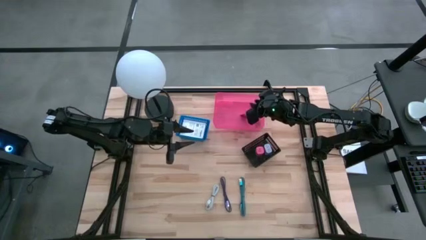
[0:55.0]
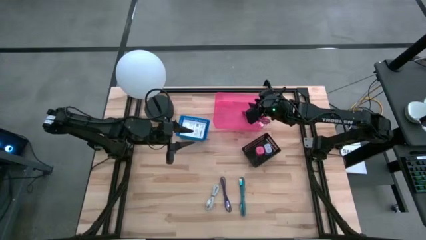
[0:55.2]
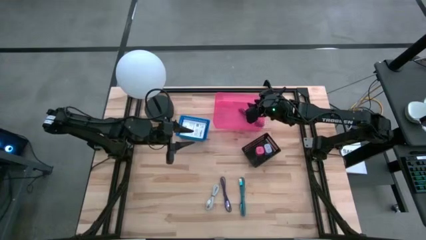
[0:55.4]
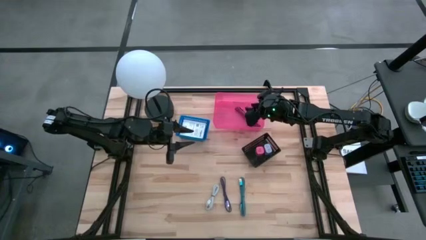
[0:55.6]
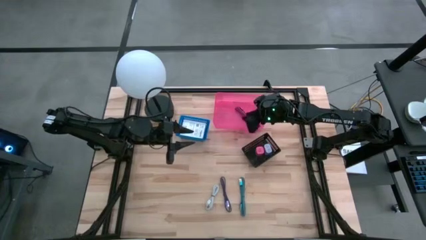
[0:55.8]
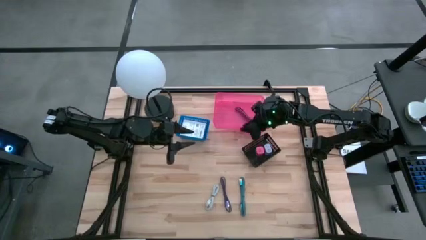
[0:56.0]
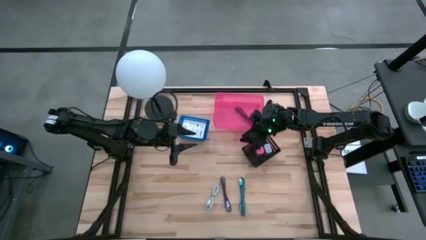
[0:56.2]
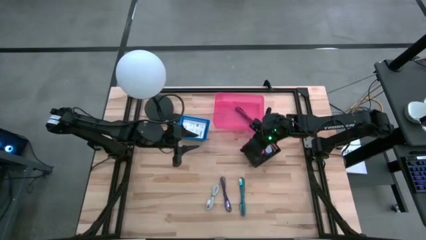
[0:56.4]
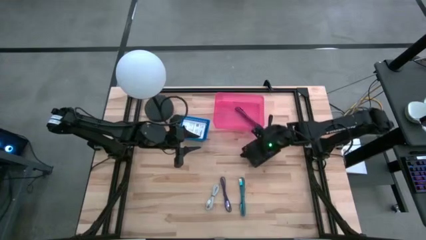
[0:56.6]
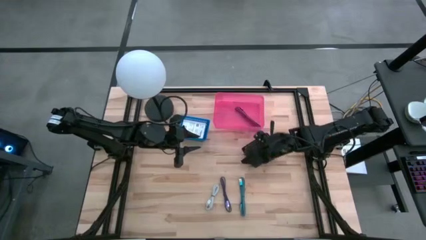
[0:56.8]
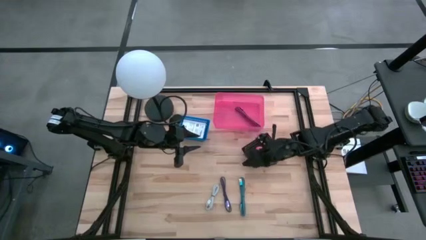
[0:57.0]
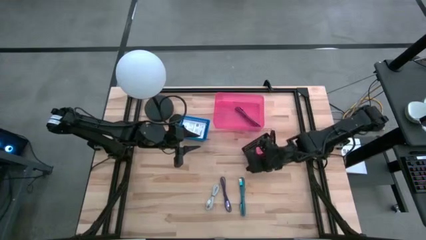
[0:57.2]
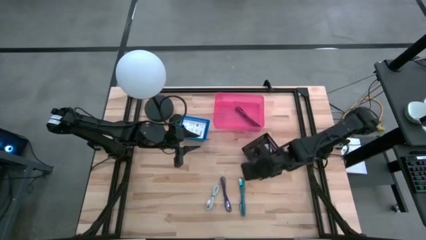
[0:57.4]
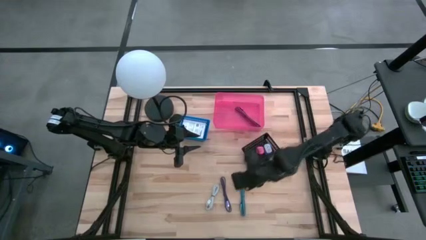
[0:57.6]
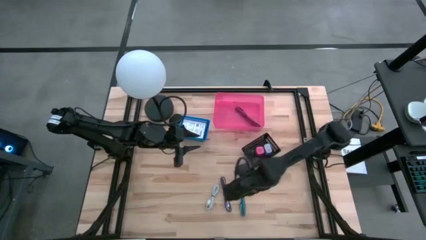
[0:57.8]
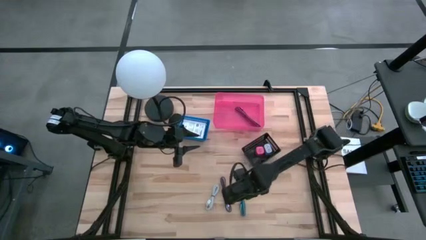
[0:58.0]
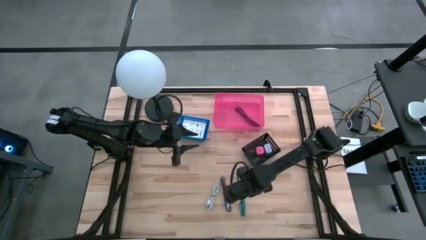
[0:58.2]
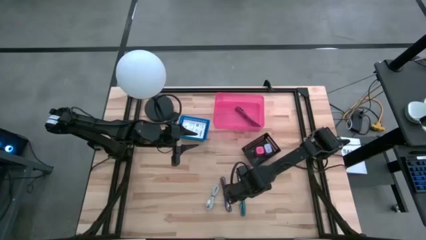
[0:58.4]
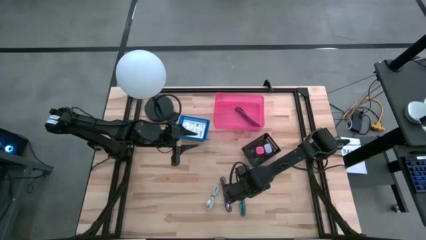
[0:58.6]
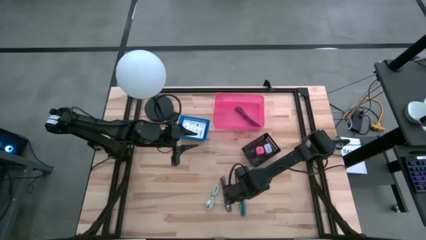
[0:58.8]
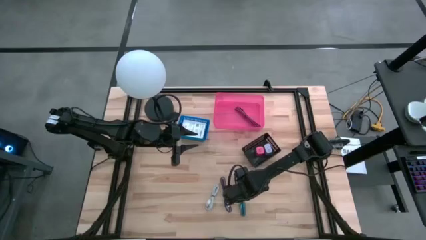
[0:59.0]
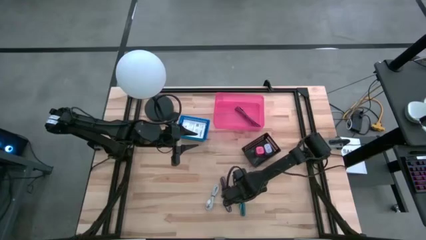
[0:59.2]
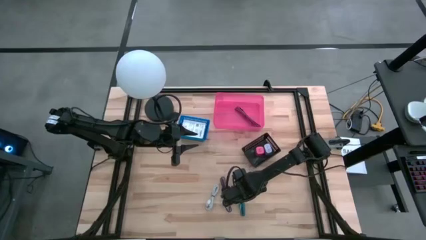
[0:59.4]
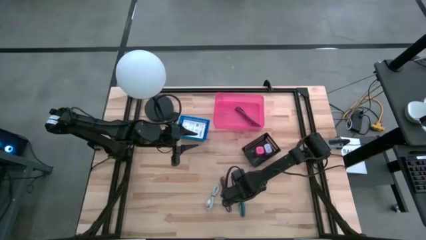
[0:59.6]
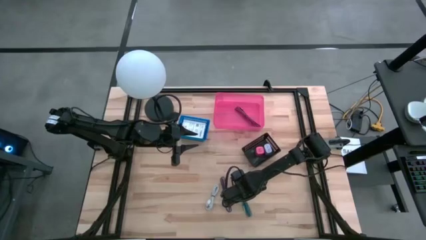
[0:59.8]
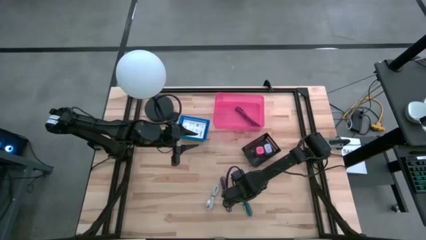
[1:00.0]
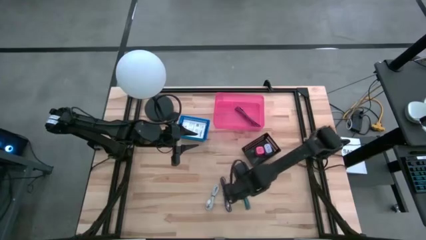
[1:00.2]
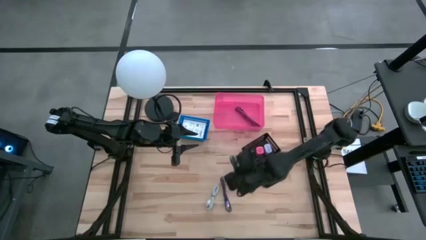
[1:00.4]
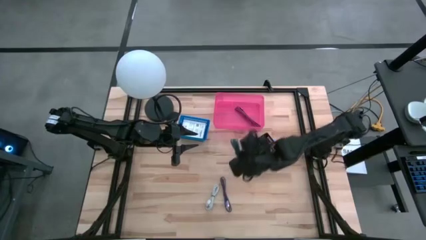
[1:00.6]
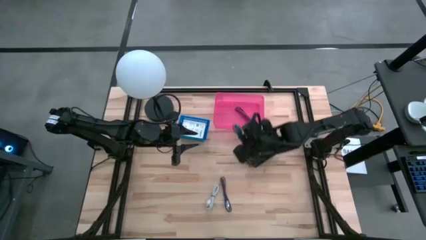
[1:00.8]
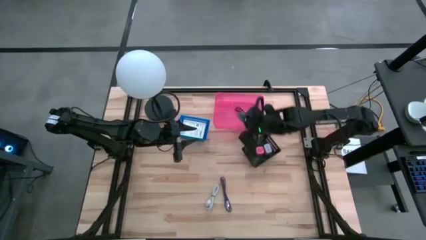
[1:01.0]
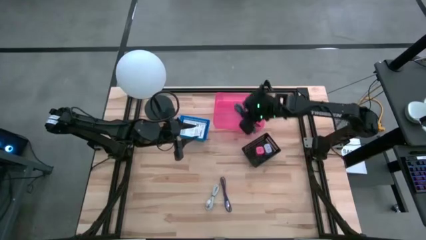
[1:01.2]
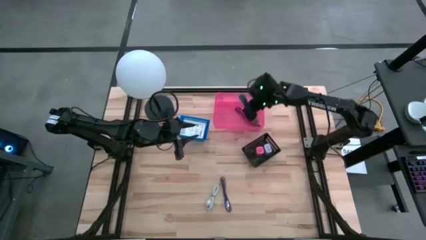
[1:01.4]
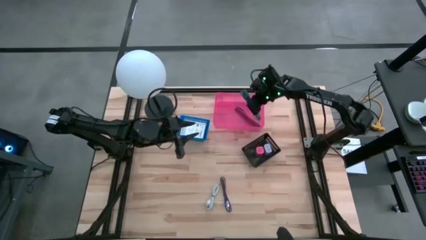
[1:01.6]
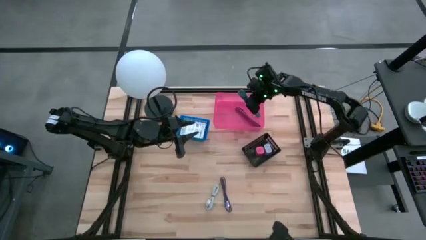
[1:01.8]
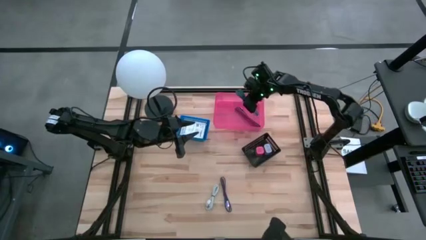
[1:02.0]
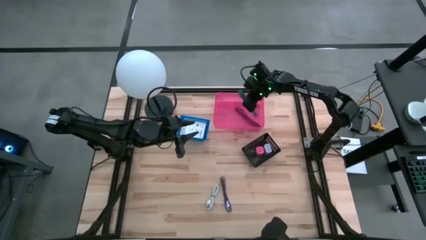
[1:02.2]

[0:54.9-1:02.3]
Task: Pick and place items into bin
Put the blue charger cable into the pink bin

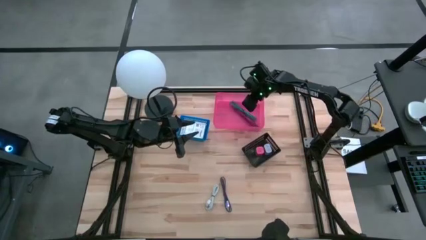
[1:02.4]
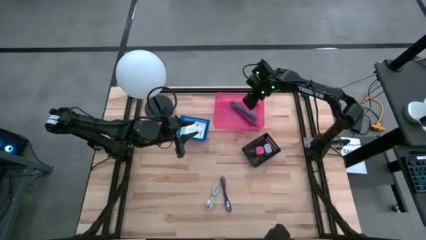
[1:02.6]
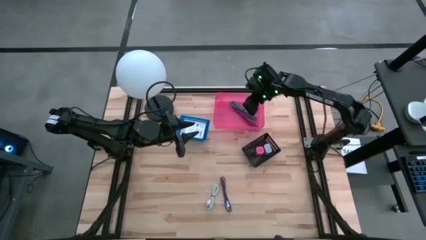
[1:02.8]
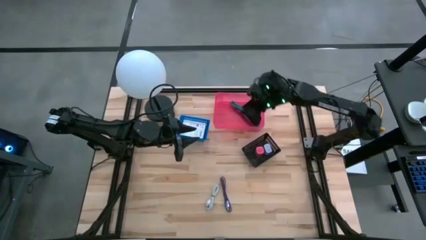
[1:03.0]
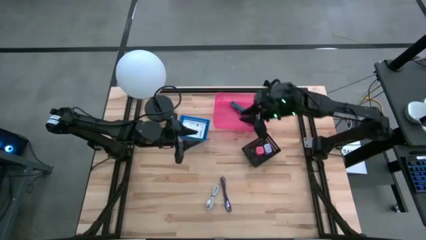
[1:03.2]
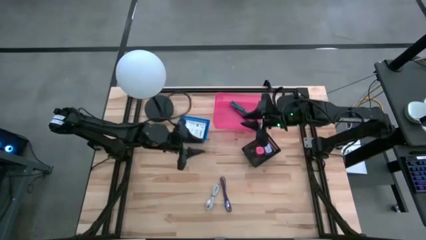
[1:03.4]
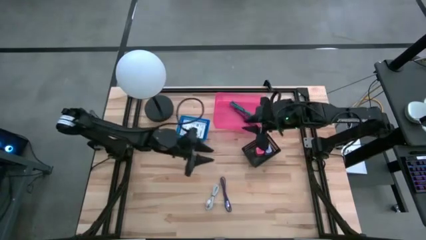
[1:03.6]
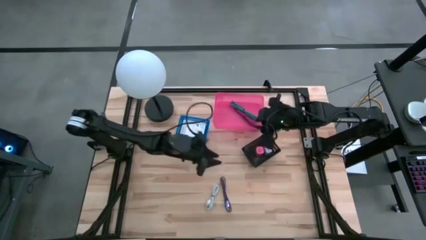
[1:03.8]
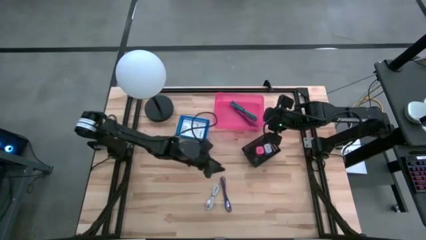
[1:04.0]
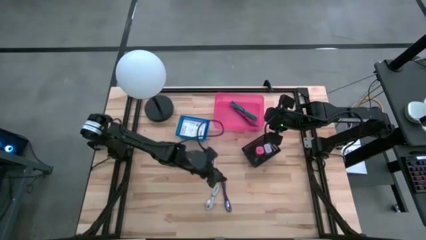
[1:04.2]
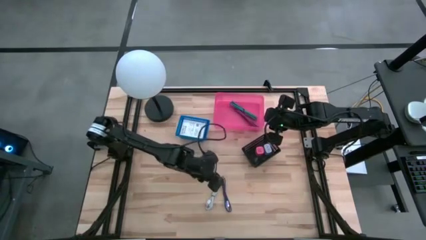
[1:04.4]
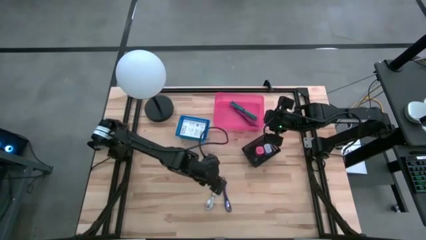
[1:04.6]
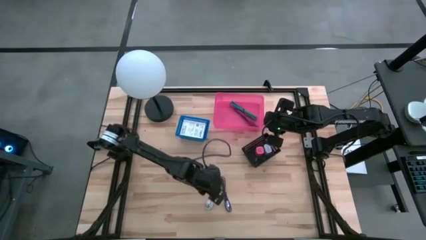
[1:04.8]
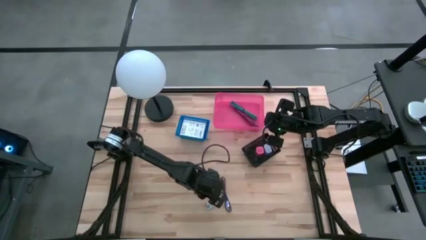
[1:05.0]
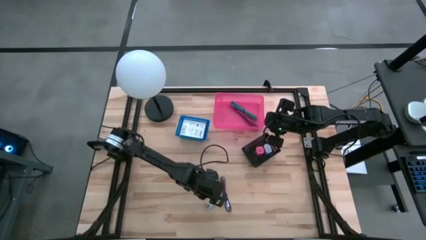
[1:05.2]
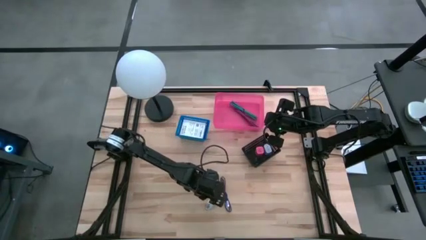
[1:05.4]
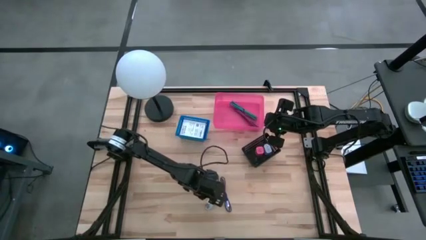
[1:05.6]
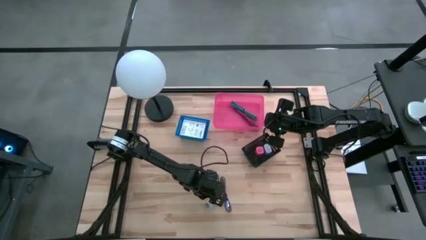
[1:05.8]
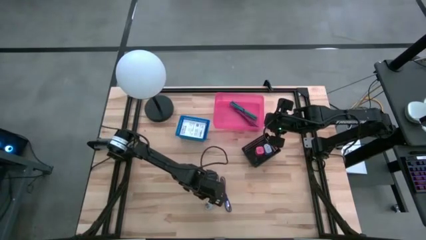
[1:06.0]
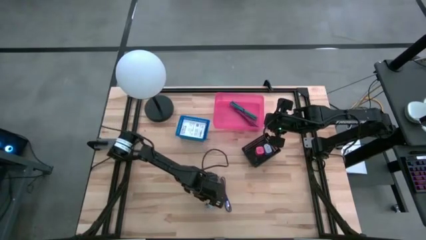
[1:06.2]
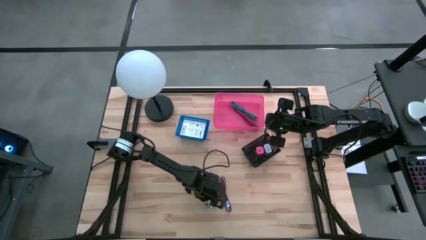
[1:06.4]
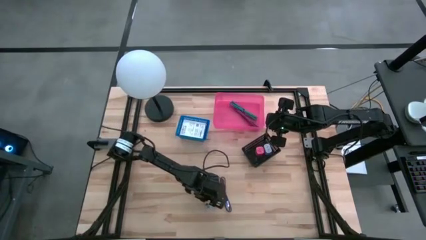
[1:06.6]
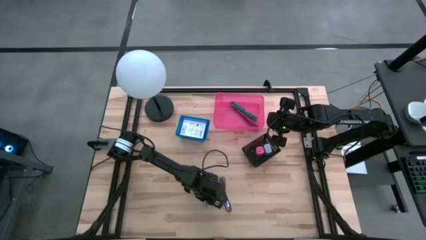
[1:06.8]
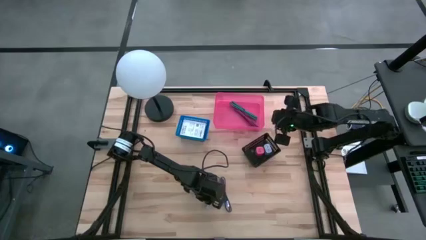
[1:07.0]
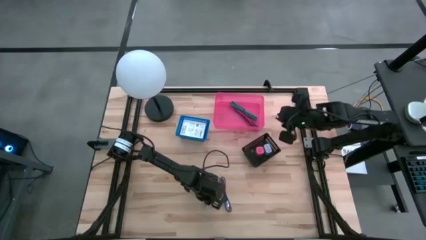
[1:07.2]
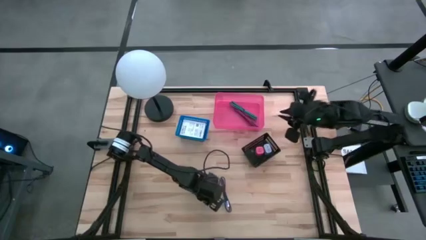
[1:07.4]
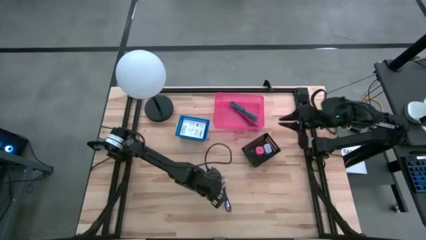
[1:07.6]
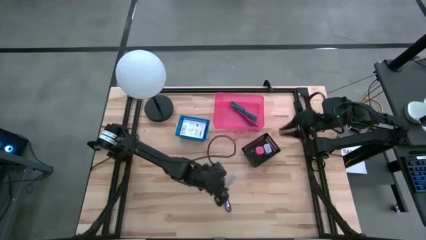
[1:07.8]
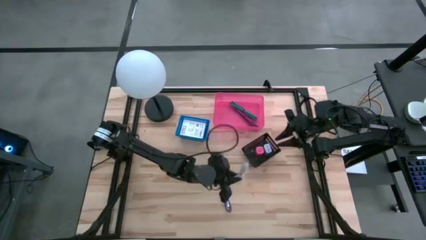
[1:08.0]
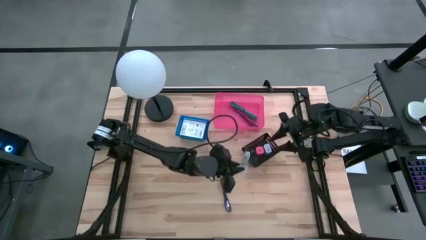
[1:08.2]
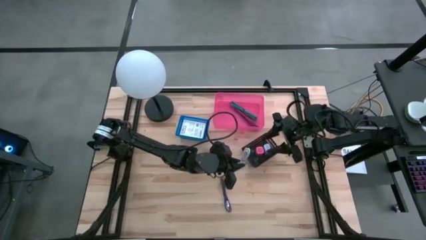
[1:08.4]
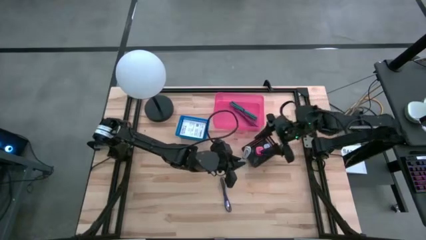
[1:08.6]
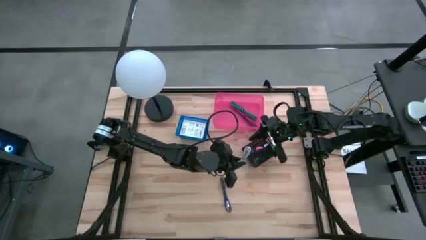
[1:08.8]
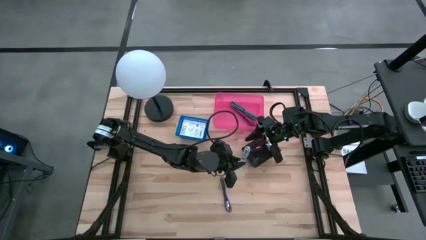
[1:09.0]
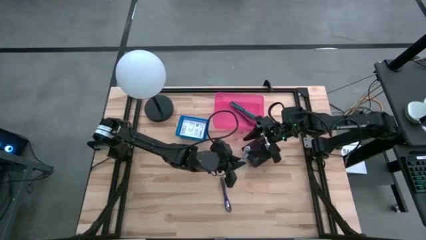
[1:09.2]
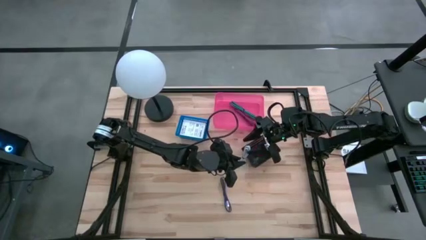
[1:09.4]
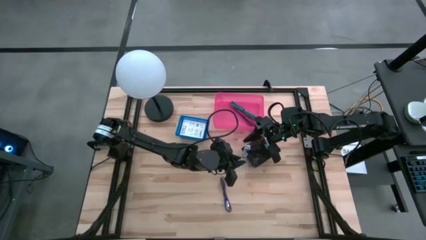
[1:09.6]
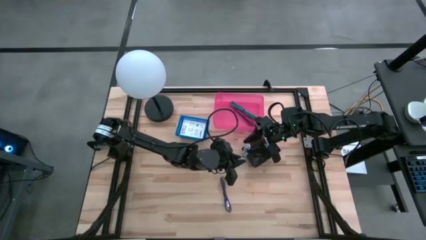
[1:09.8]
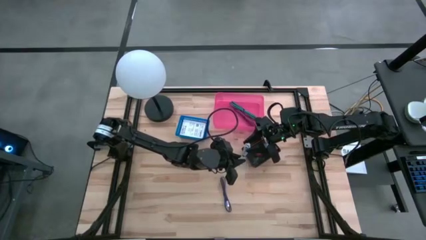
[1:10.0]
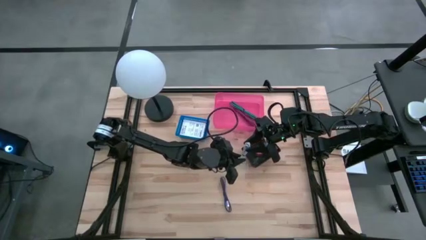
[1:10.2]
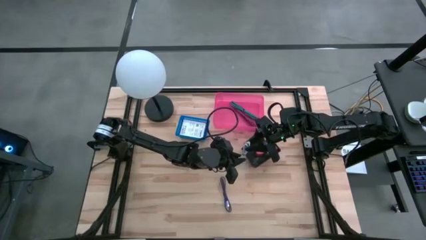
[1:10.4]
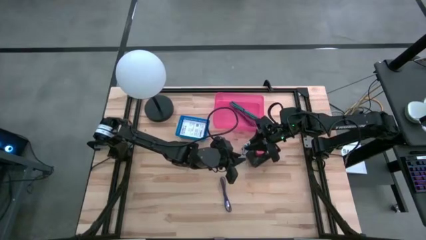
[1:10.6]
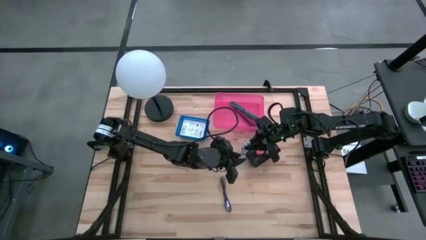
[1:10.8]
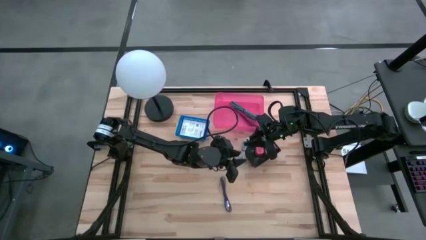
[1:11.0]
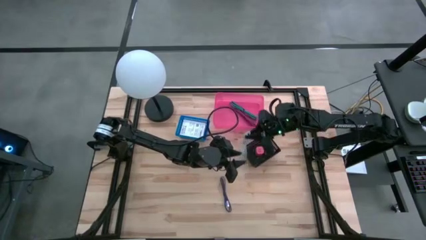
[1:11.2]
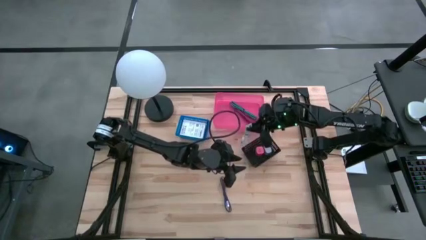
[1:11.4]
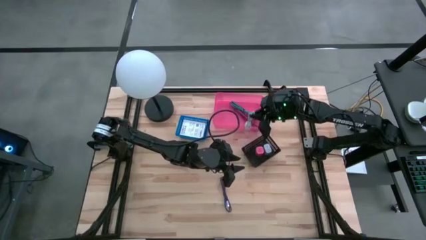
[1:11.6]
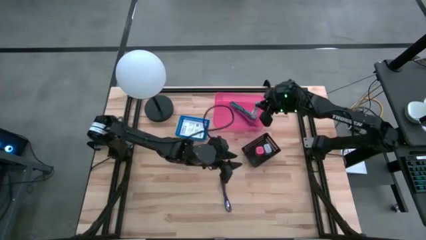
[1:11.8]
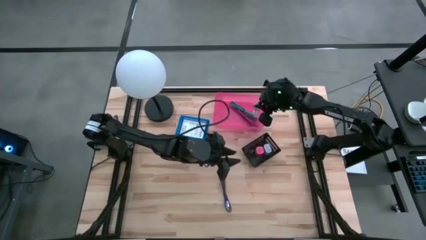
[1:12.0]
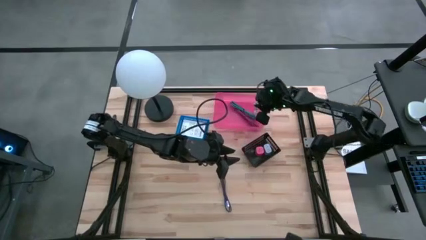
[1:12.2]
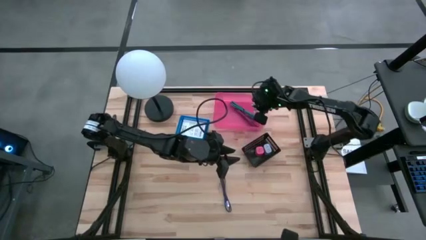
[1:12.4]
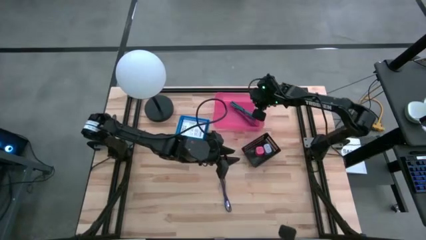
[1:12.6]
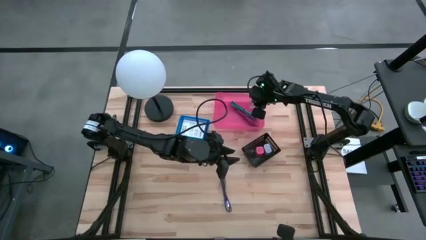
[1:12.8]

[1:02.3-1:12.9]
Put the white charger cable into the pink bin
